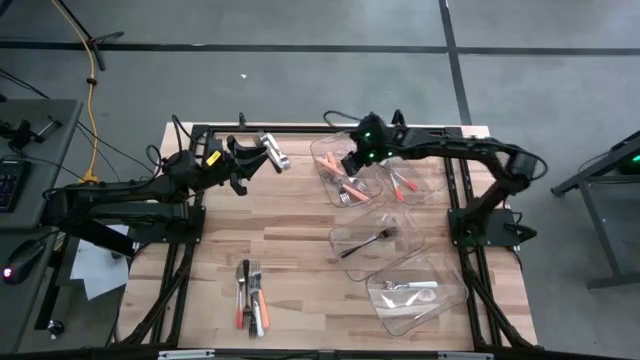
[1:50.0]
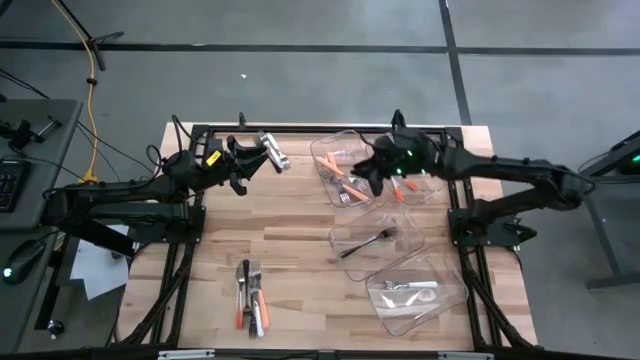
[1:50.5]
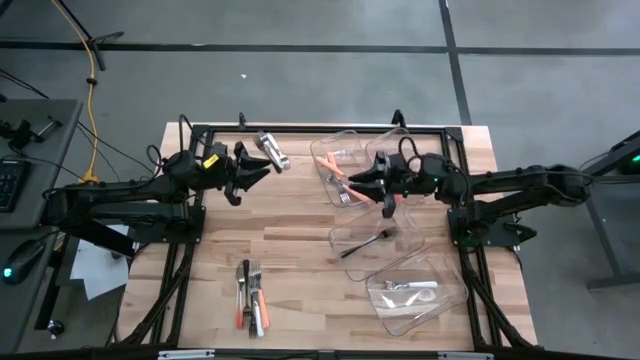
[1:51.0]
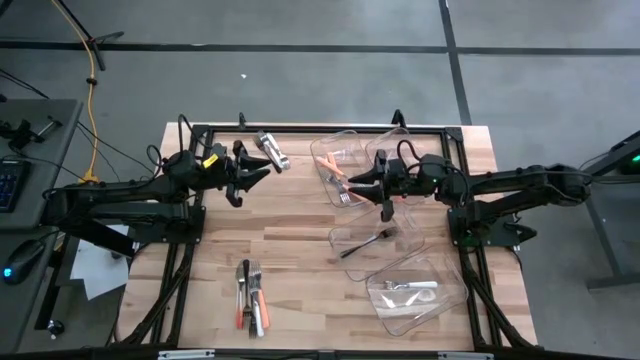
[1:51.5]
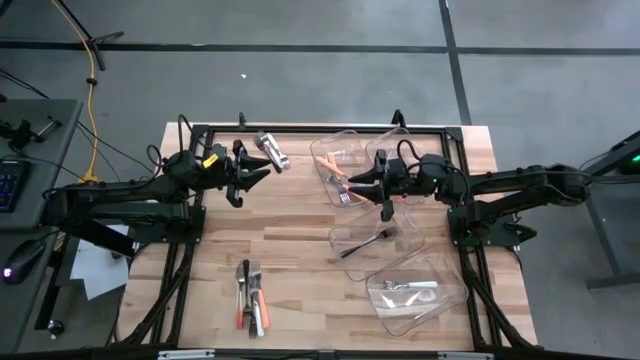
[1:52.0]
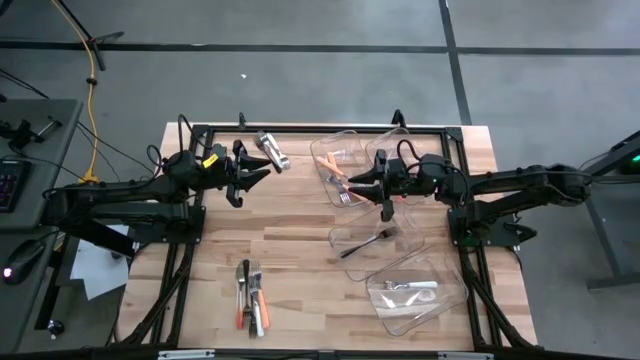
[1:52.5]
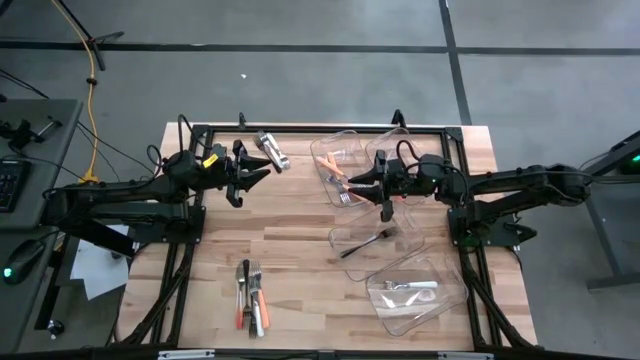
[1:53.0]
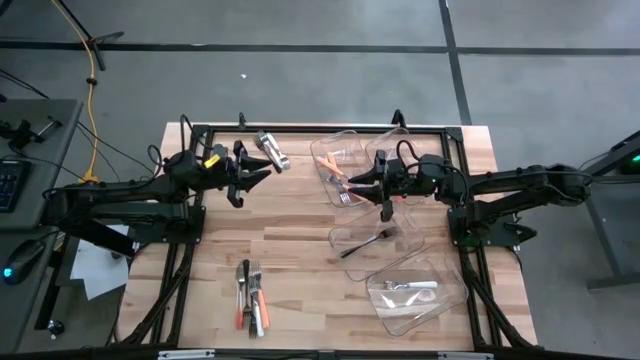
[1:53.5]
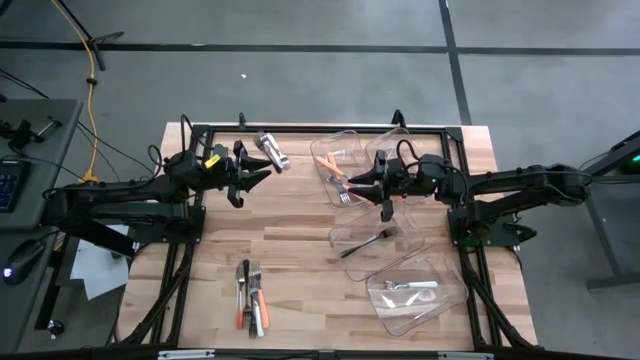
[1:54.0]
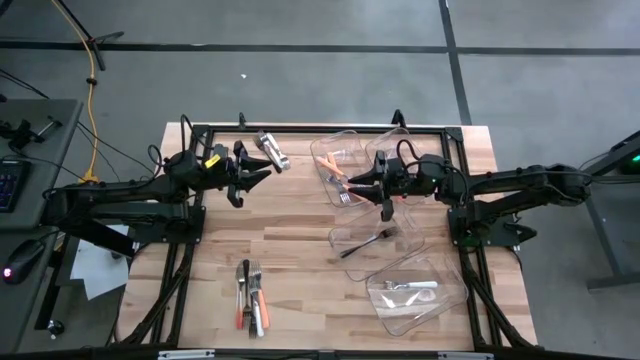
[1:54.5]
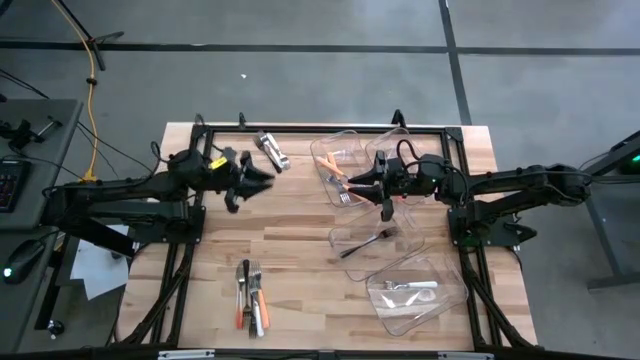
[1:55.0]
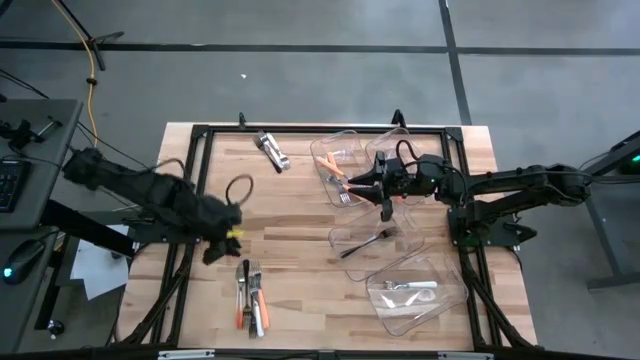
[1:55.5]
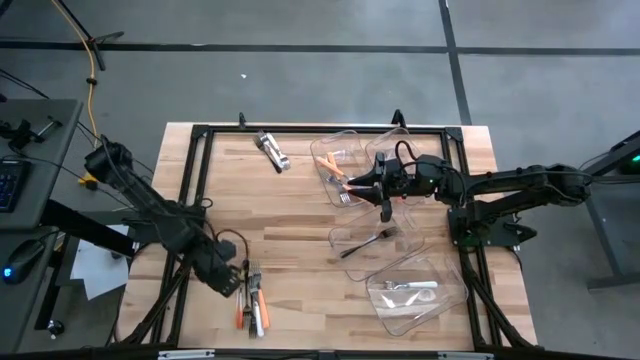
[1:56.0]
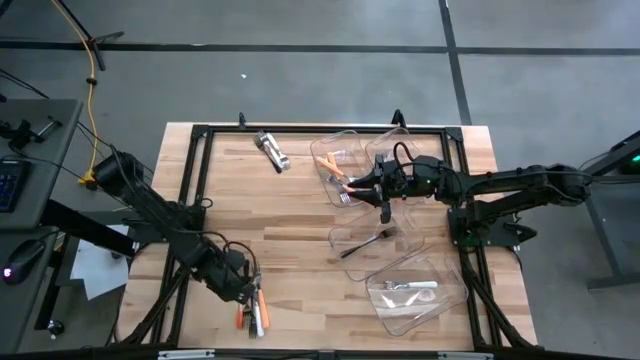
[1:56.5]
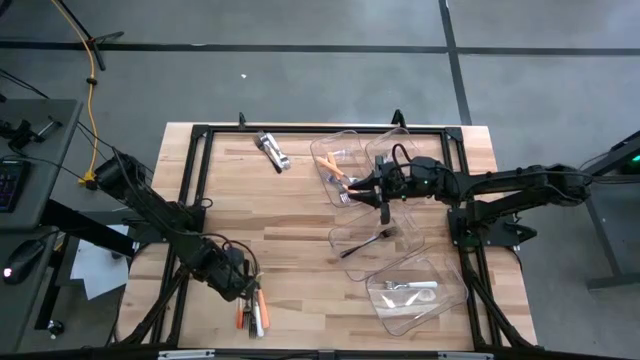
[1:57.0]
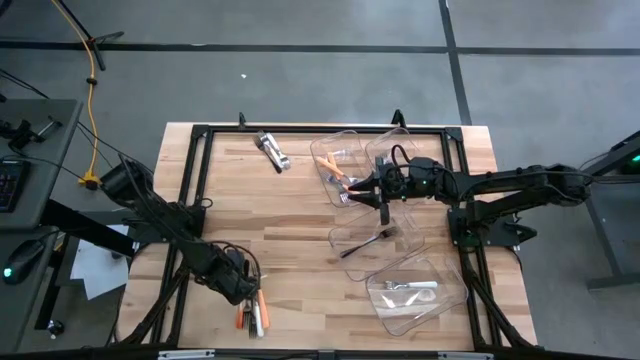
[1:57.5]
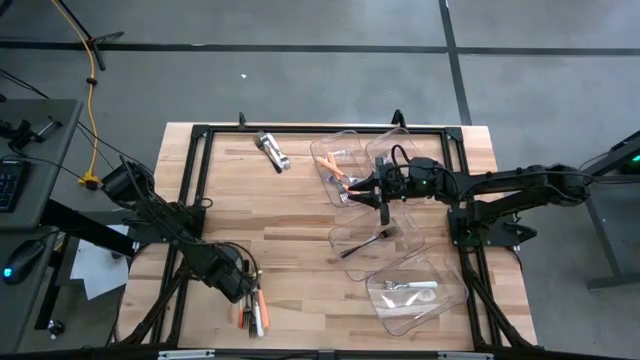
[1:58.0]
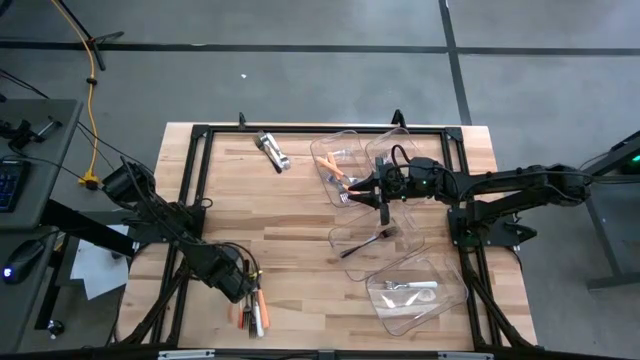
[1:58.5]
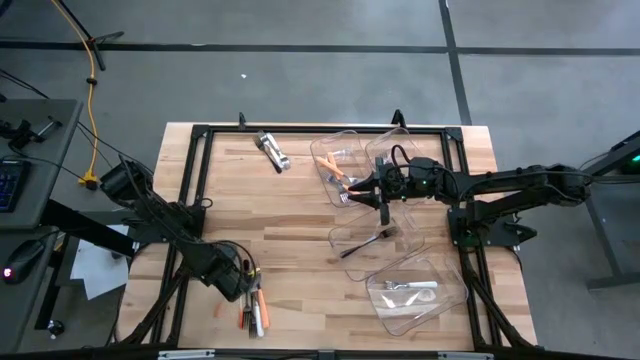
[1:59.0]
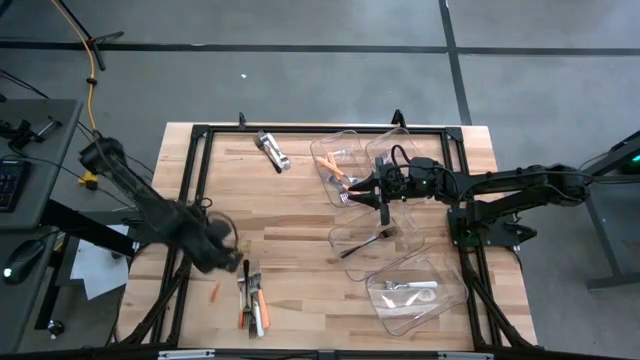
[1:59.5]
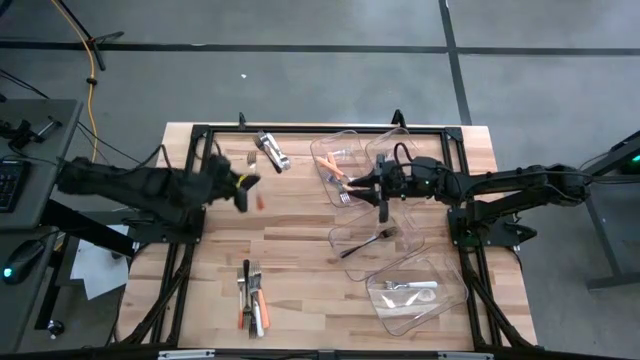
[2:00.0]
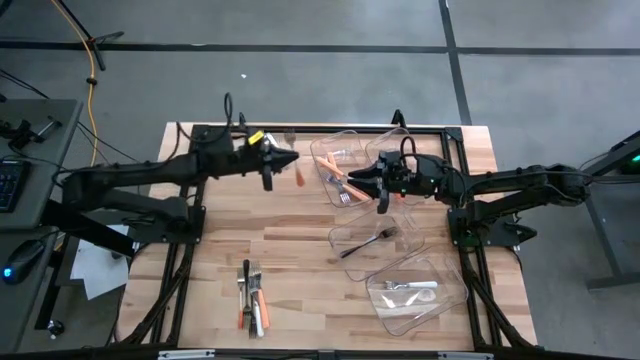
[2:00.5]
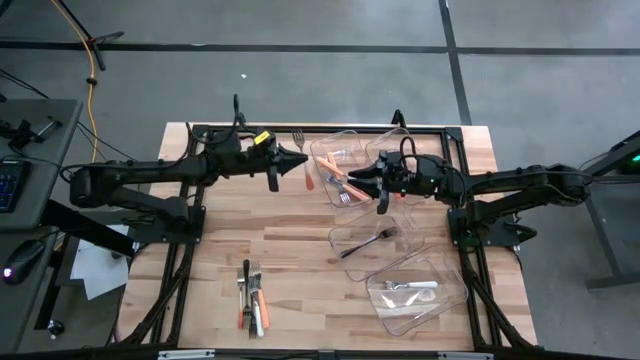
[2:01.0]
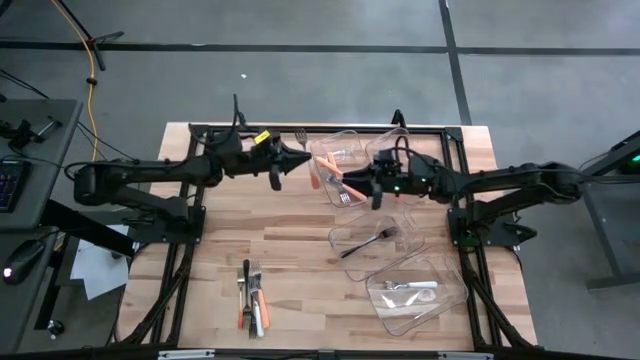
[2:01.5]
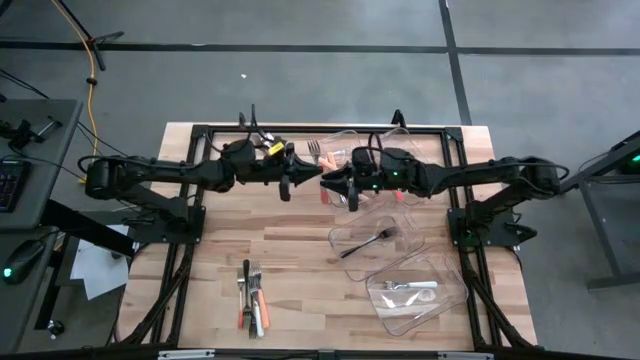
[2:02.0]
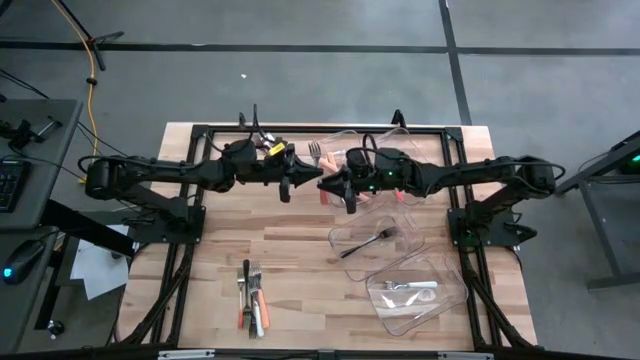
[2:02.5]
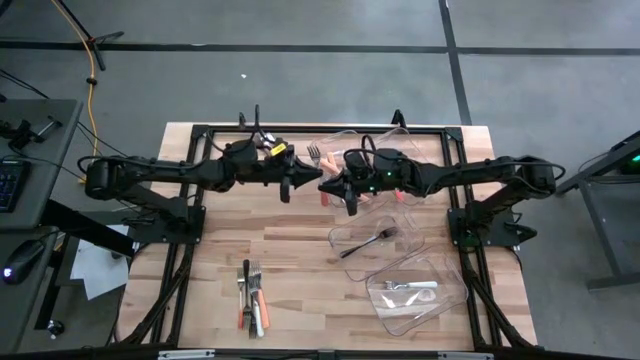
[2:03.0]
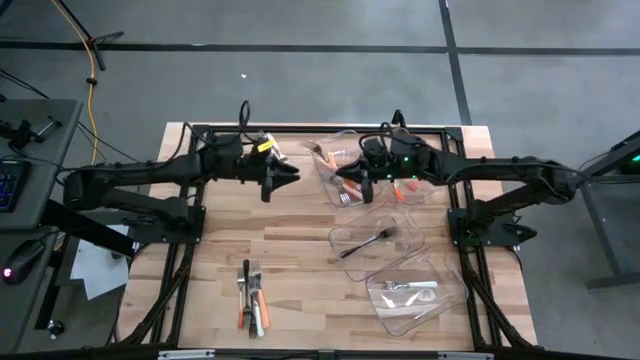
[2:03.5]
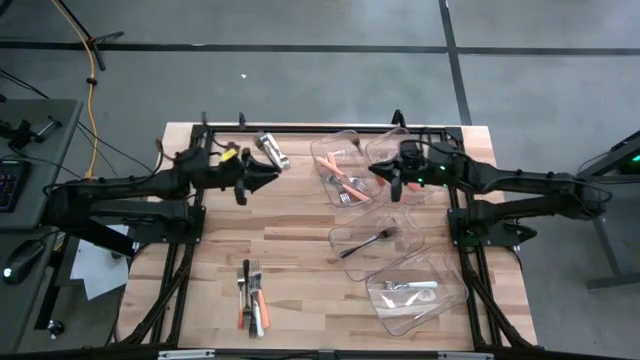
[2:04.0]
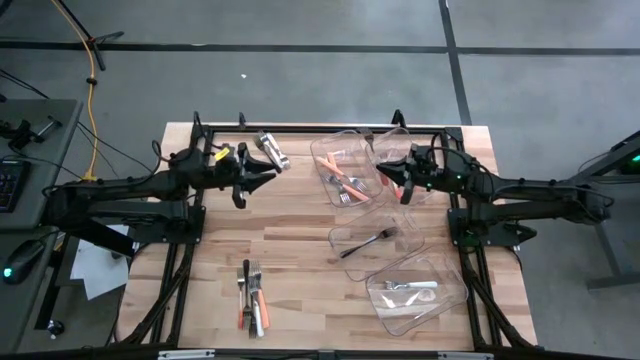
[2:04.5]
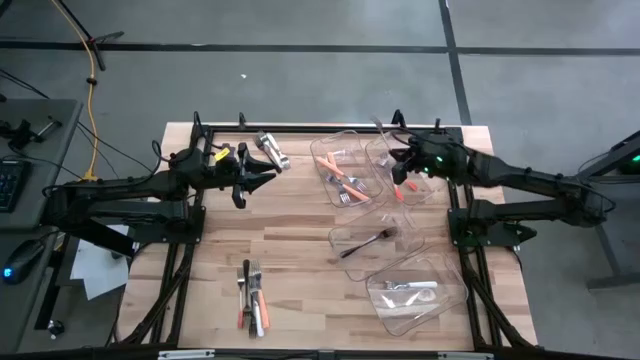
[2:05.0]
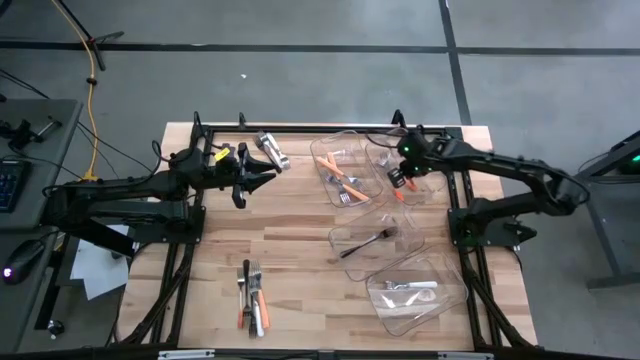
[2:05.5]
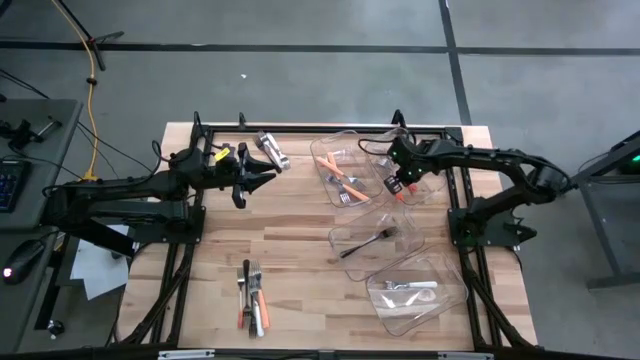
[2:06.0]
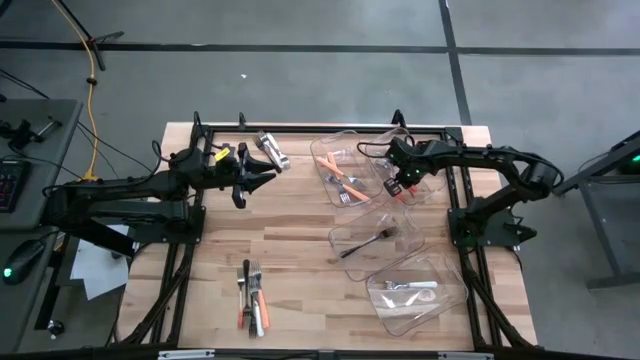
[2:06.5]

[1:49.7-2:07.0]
Task: Sort silverware by color (type)
Put the orange fork into the right transparent bin

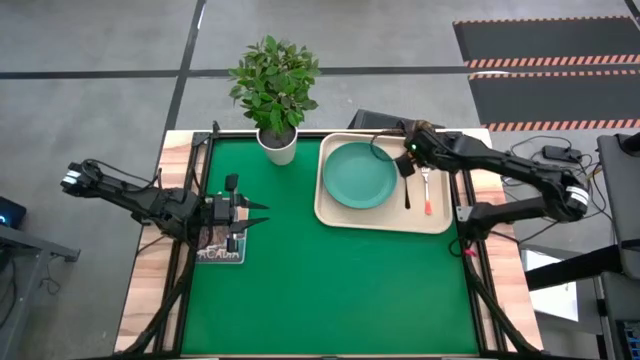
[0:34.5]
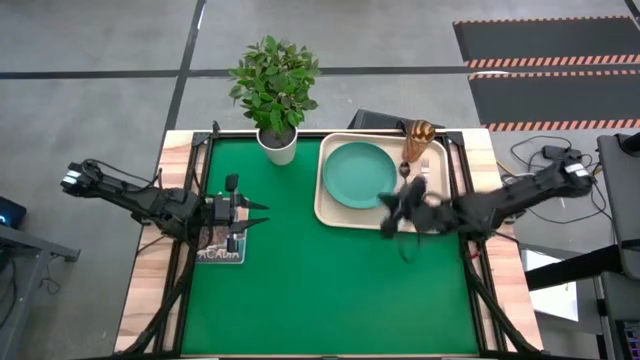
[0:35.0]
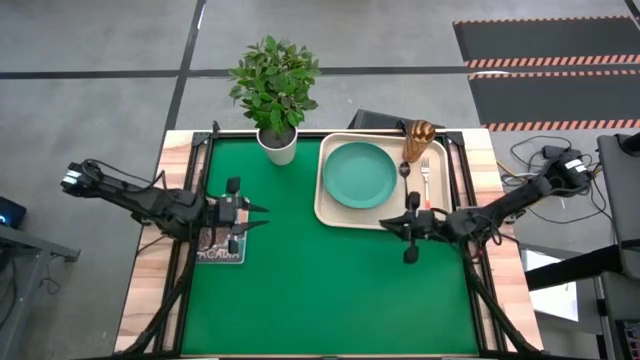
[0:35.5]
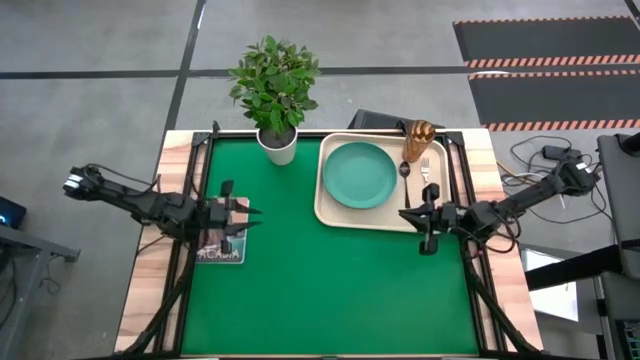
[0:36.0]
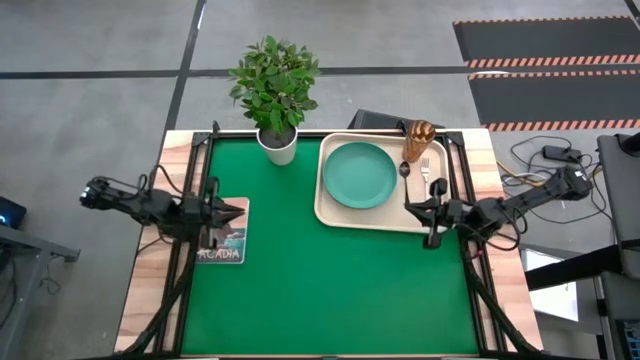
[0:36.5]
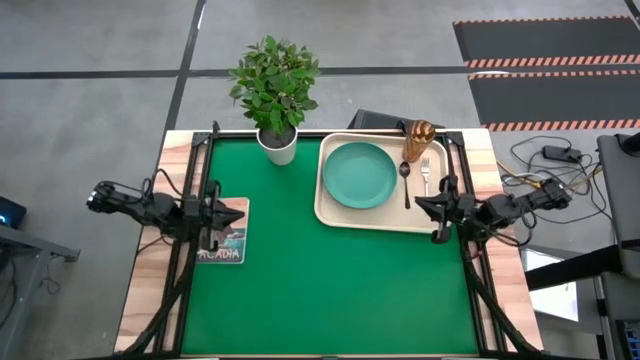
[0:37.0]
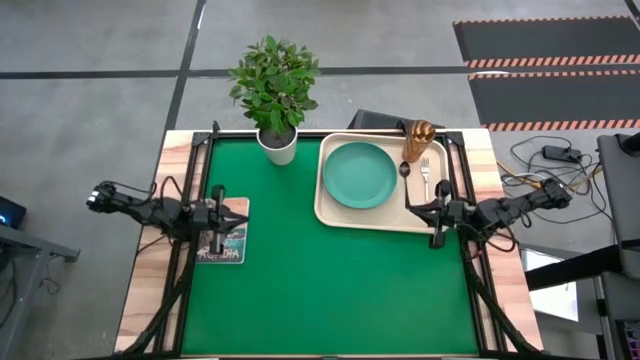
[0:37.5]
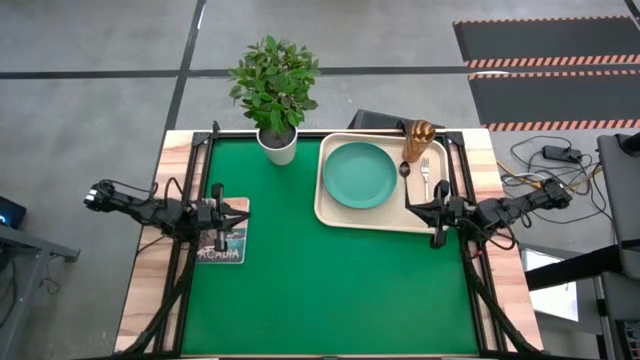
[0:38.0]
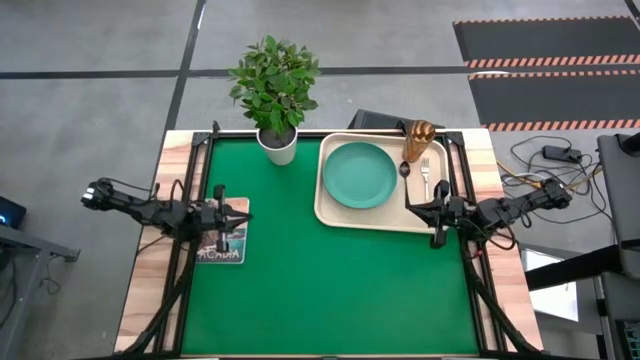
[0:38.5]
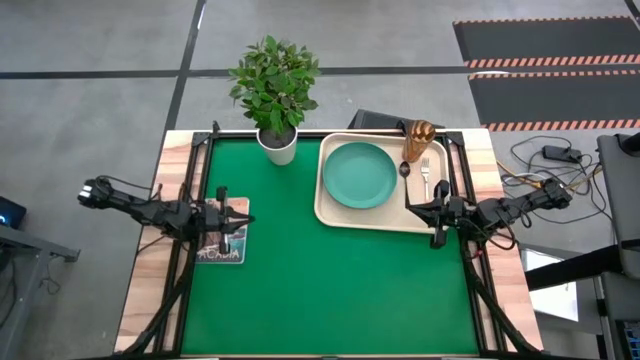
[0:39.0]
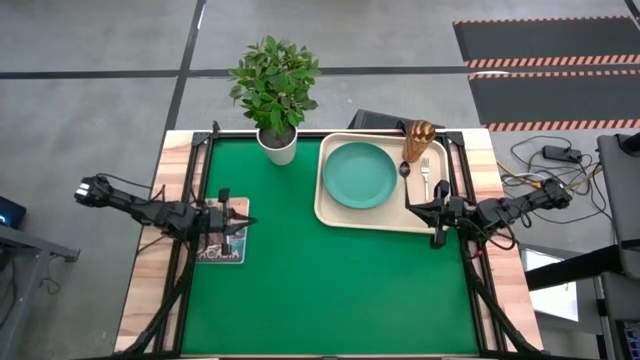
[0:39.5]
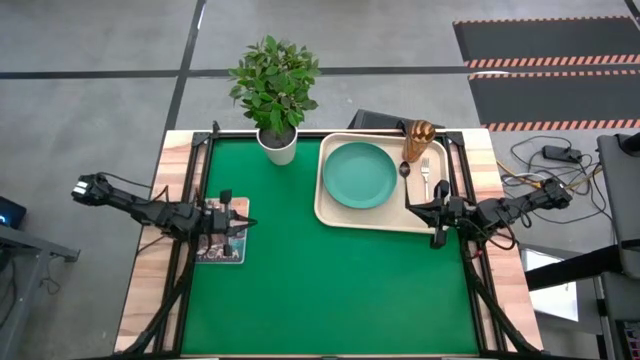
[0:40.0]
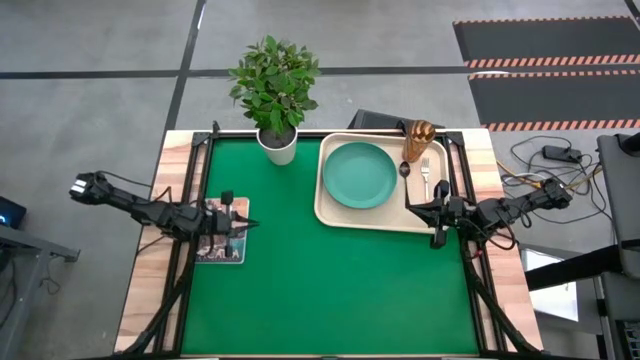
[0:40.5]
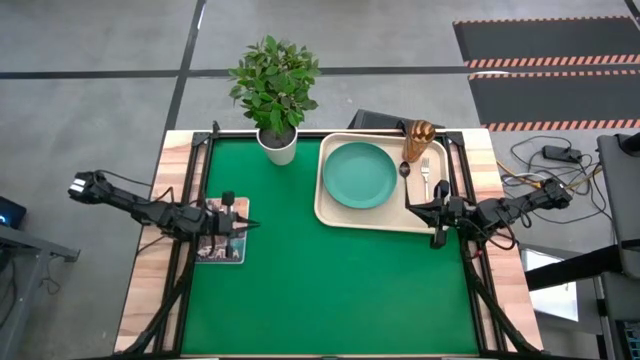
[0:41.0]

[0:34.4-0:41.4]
Task: Pick and place plate/cup/fork/spoon on tray
Return to Home Position
